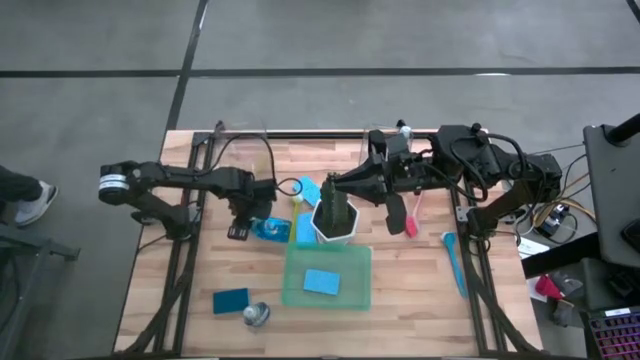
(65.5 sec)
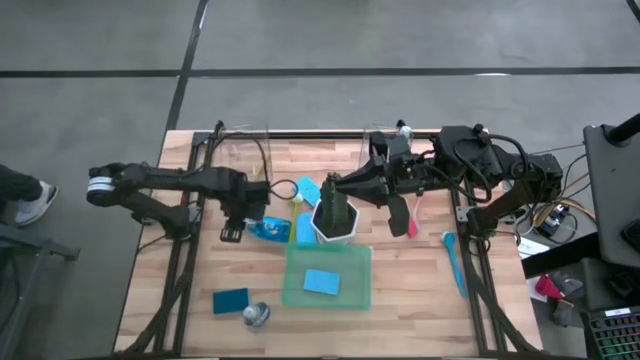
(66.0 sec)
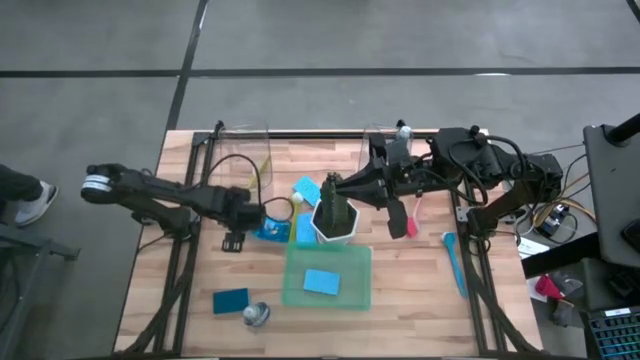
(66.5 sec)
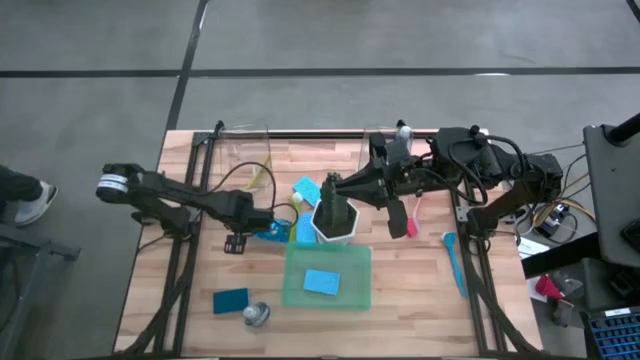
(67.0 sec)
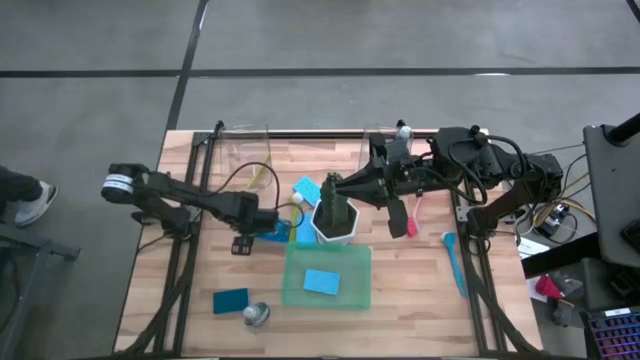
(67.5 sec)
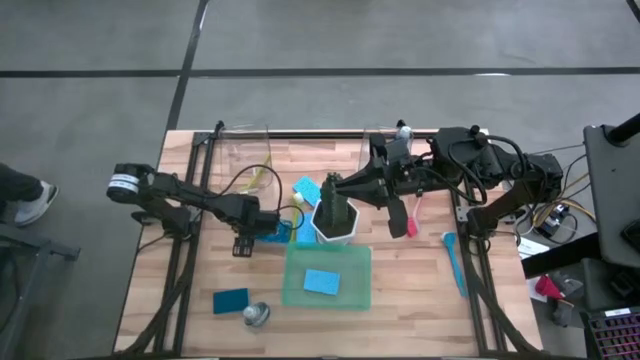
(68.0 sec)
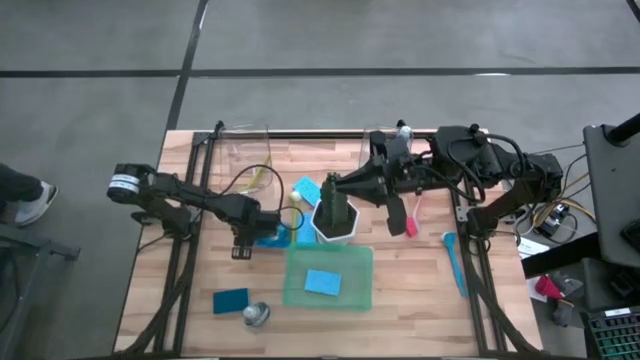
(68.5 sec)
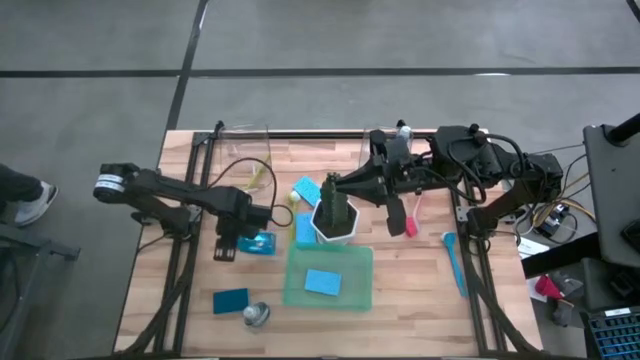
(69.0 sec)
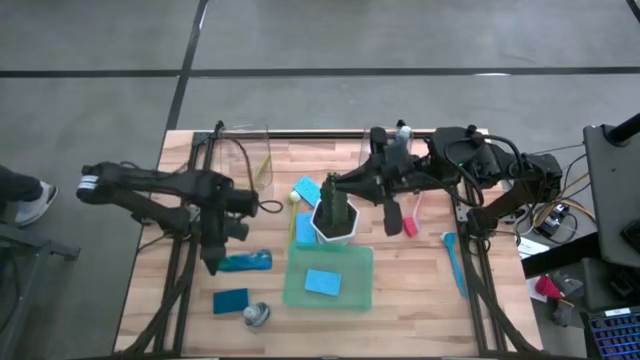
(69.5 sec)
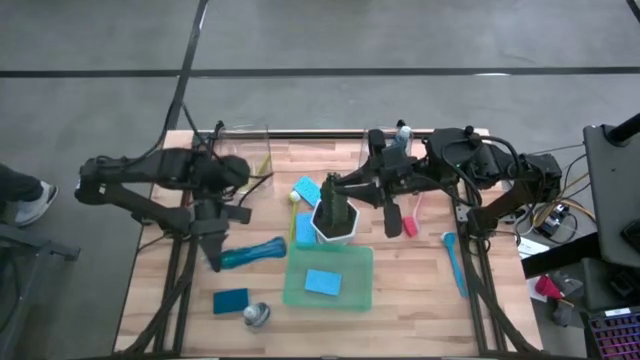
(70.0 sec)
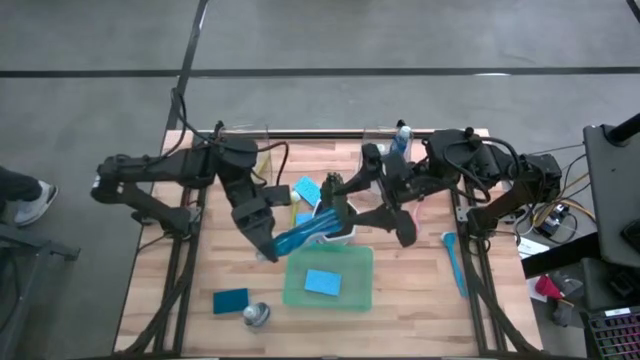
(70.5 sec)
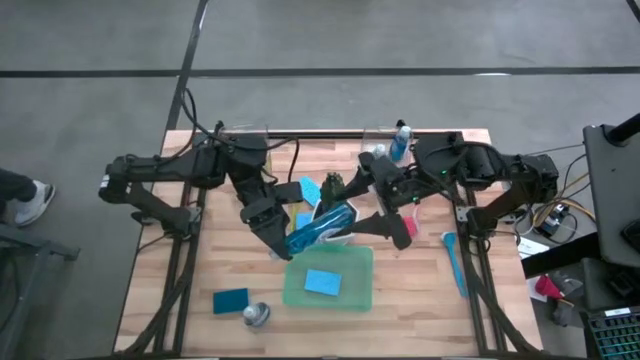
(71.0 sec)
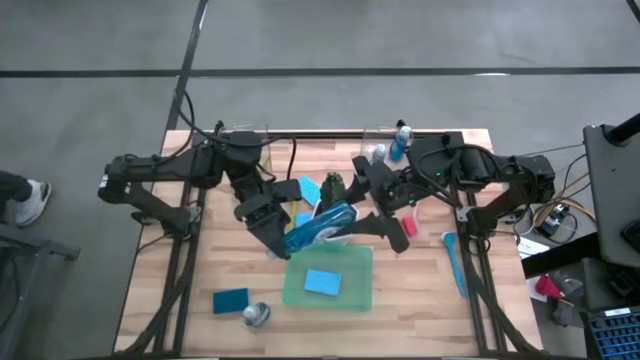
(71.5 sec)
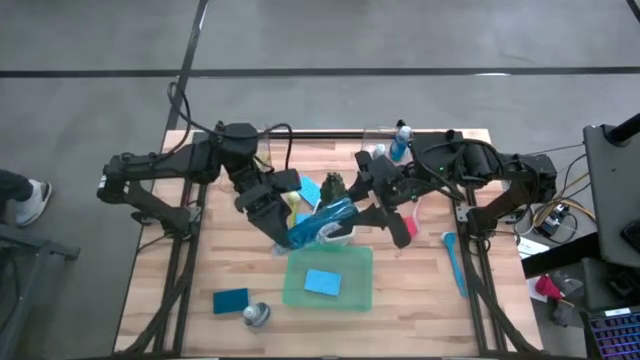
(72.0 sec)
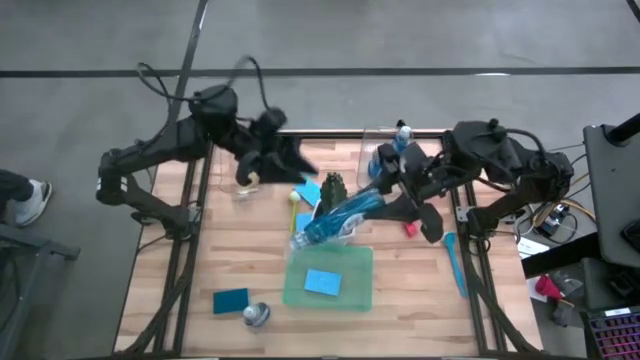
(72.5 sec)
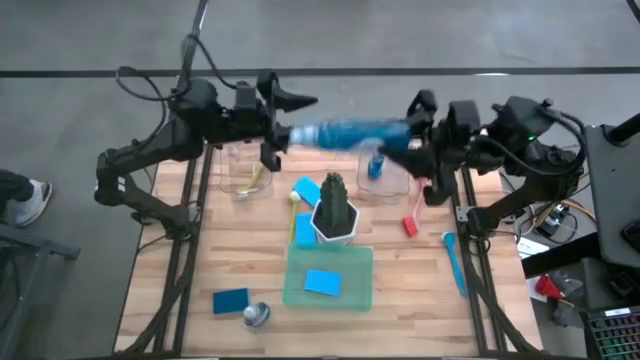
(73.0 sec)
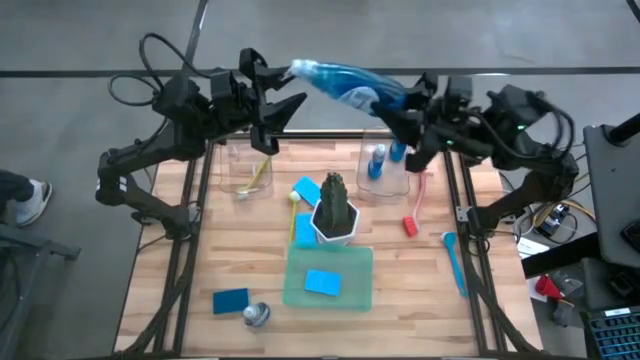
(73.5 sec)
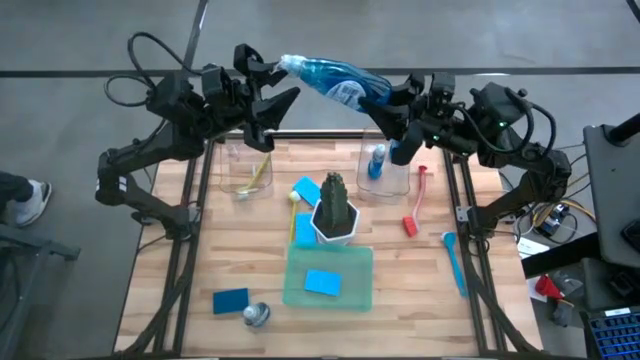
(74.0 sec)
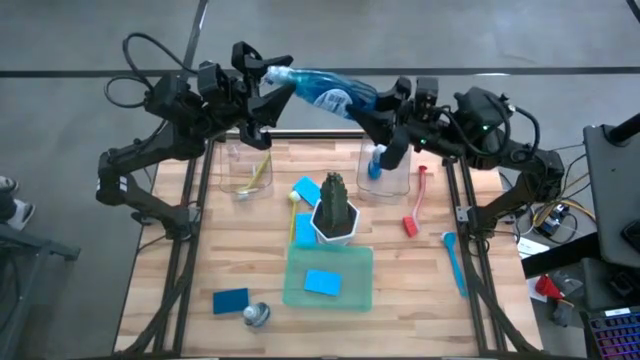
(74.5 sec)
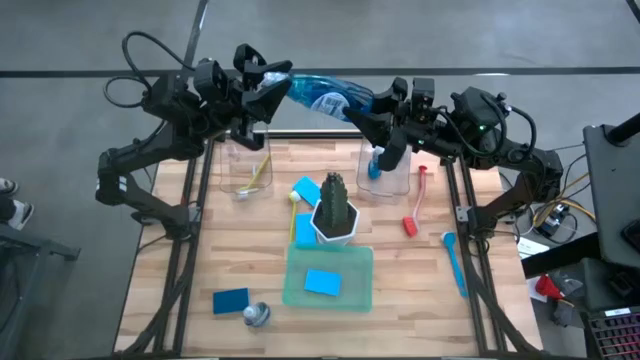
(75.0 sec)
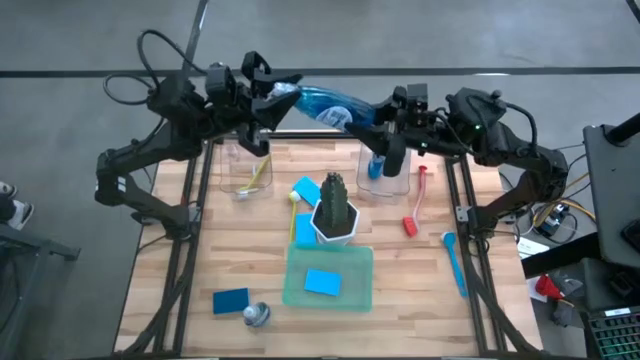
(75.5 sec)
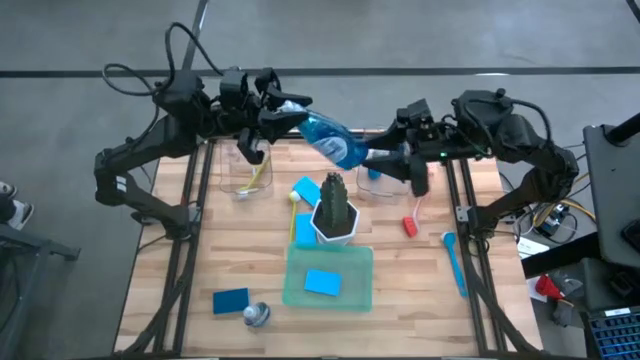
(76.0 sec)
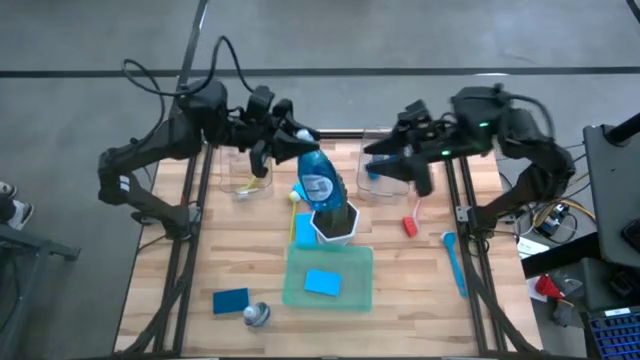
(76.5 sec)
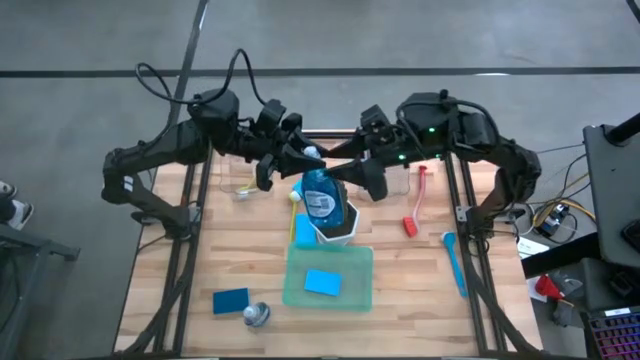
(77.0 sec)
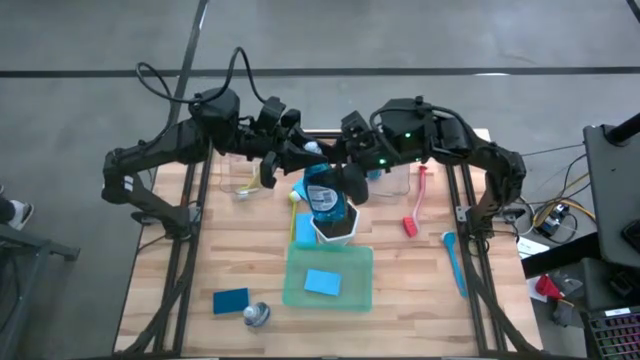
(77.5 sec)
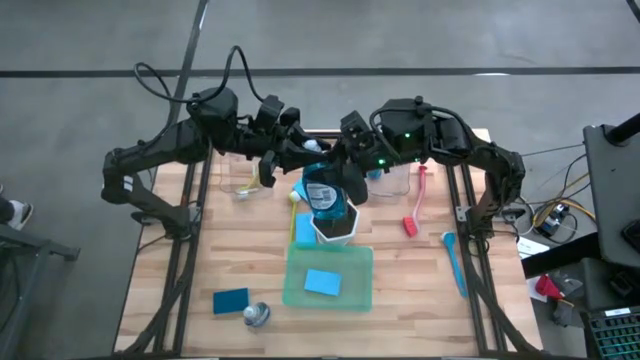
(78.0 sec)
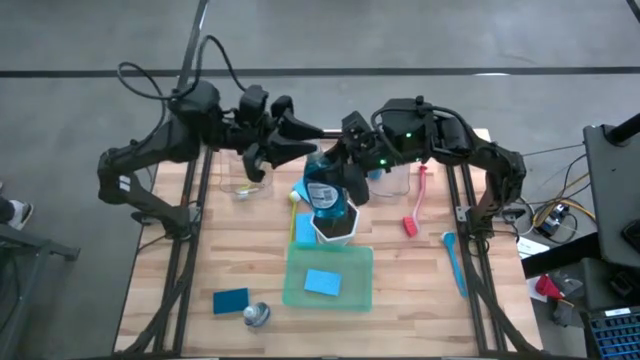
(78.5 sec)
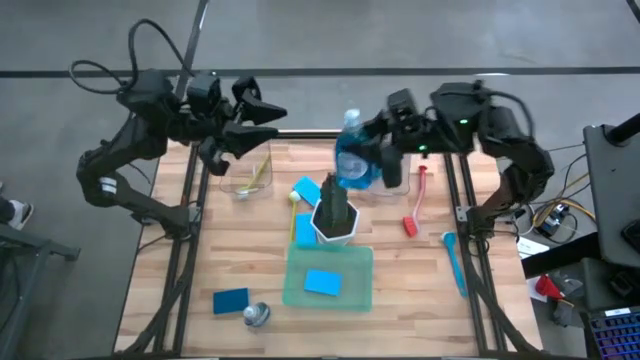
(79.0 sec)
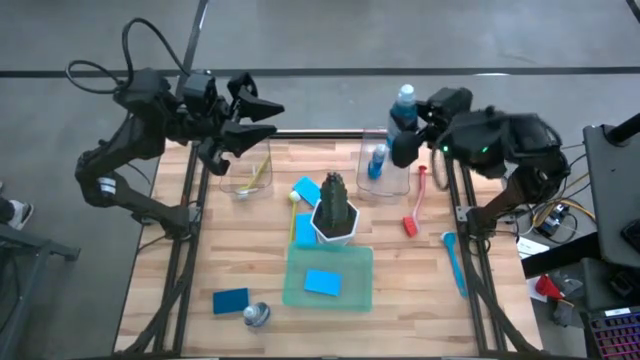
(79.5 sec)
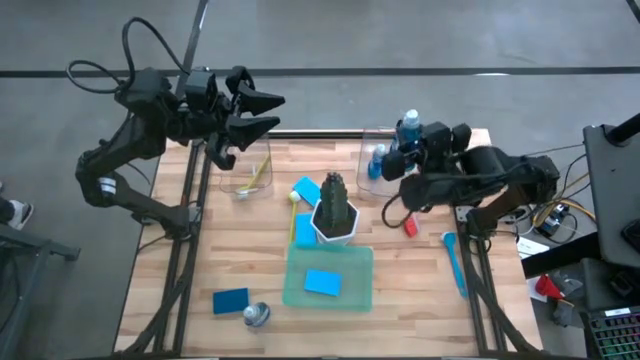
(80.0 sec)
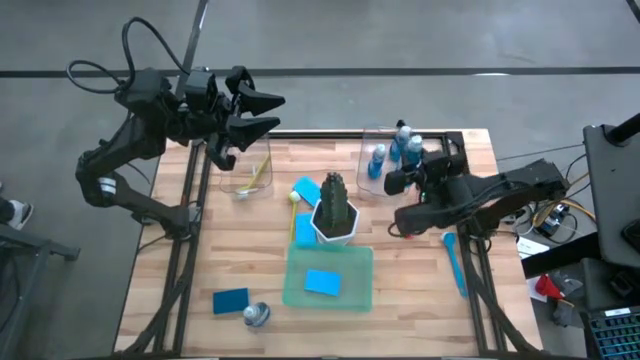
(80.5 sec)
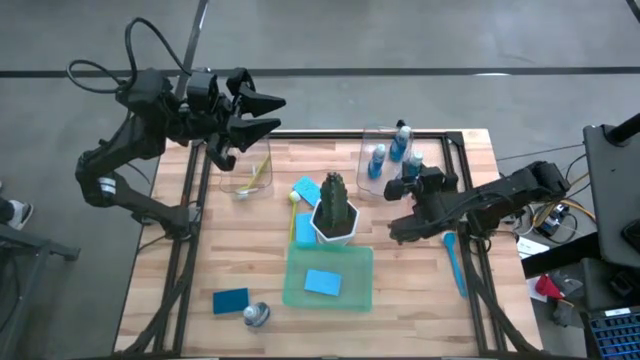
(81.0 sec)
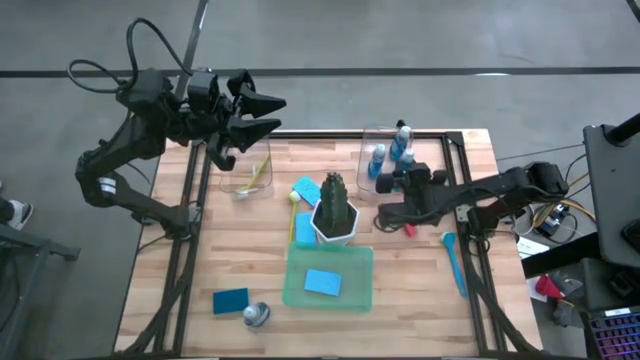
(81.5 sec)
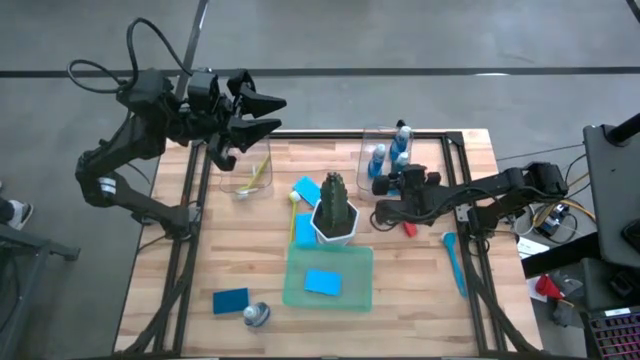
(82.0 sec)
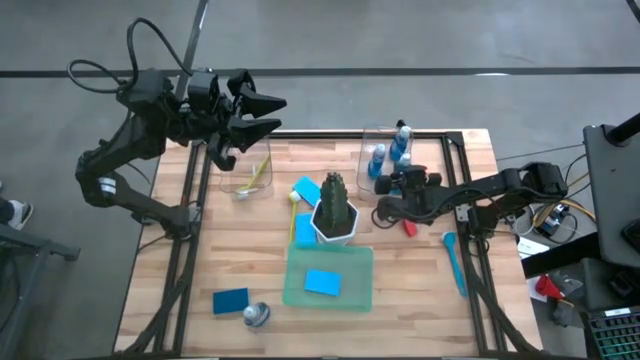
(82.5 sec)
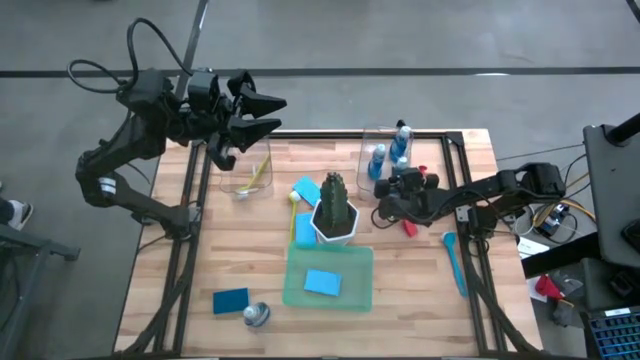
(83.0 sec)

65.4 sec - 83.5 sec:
Task: Pick & Place Kitchen Sink Supplies
Put the dish soap into the right transparent bin

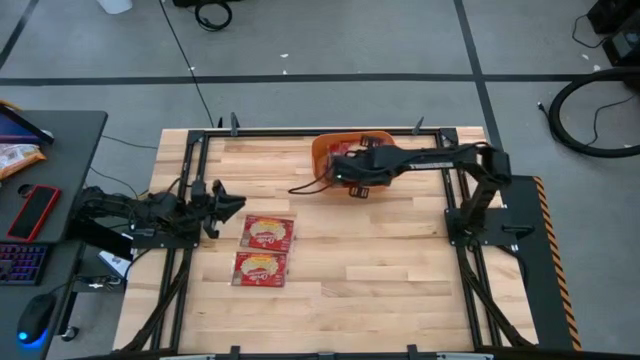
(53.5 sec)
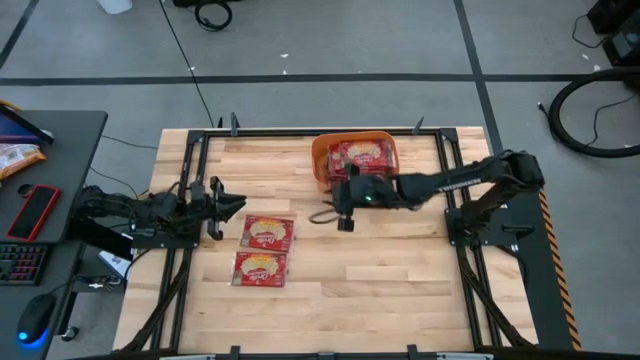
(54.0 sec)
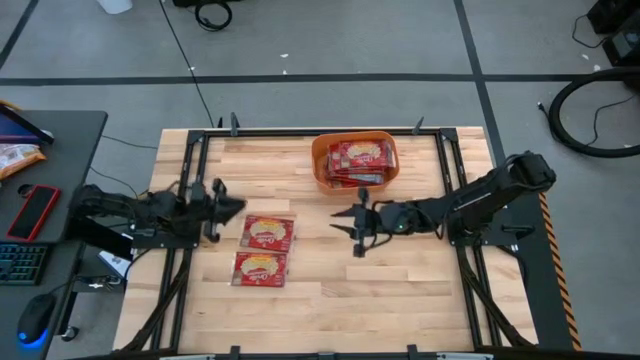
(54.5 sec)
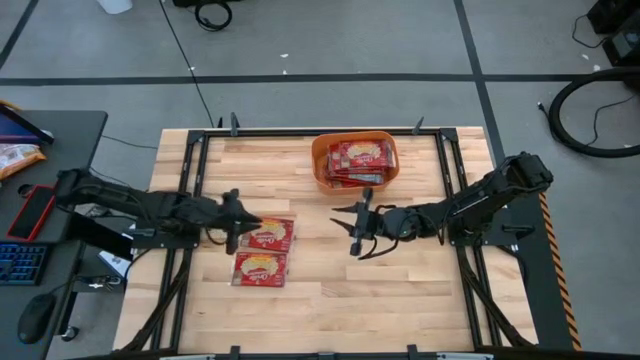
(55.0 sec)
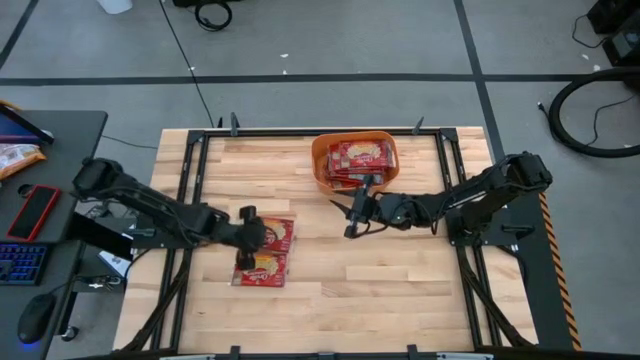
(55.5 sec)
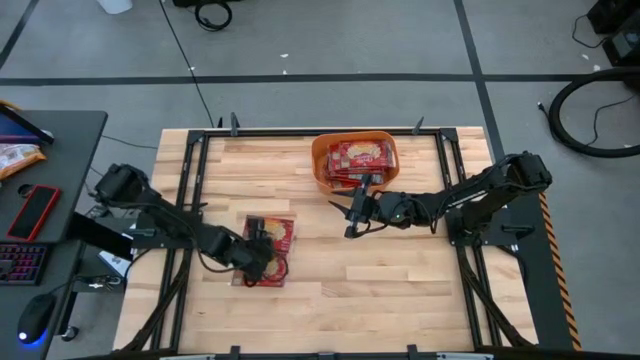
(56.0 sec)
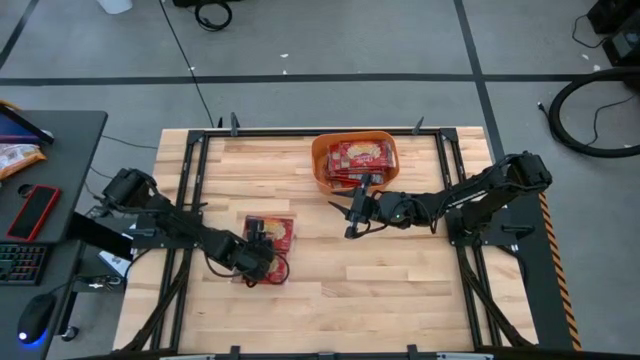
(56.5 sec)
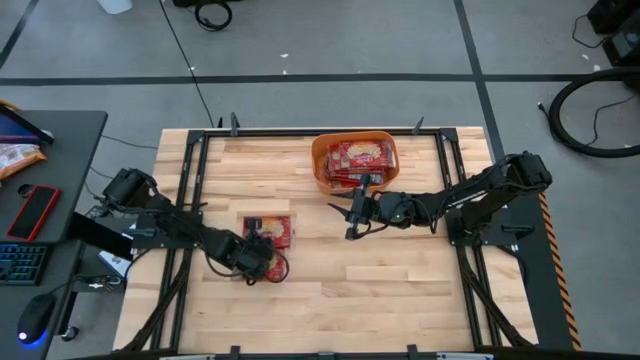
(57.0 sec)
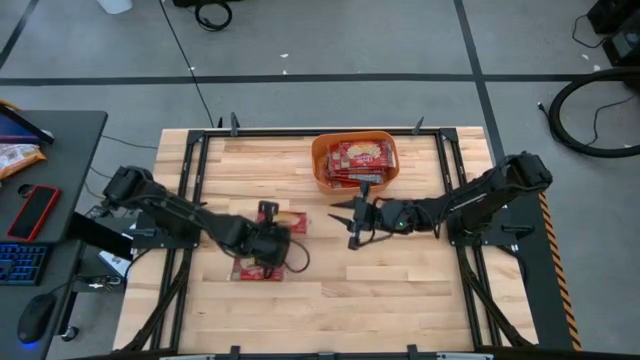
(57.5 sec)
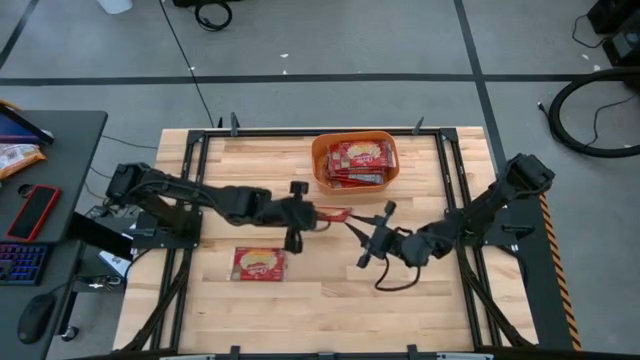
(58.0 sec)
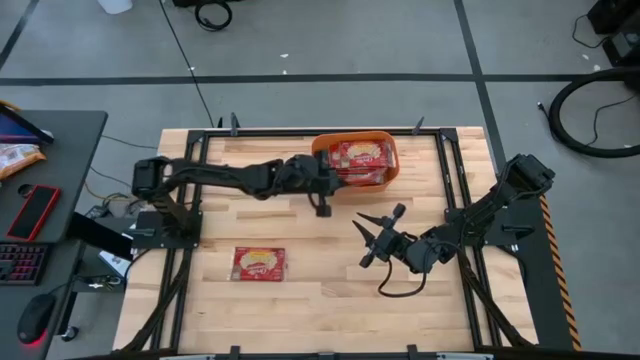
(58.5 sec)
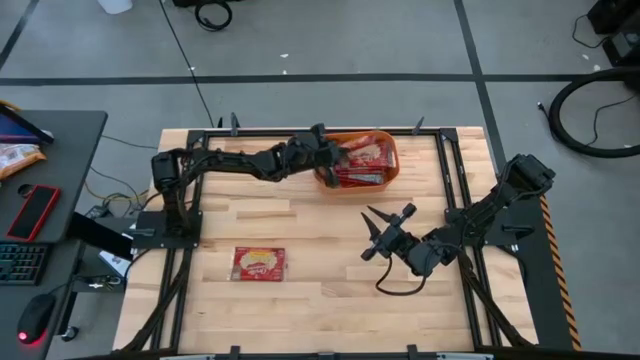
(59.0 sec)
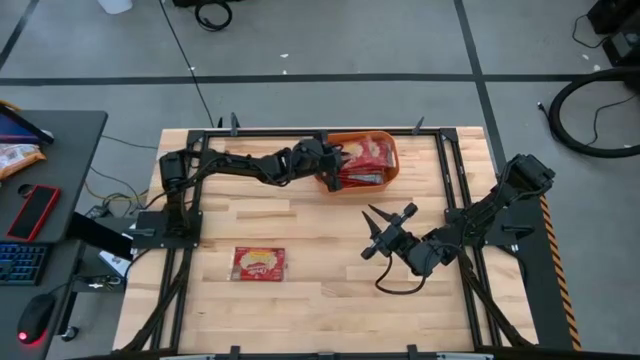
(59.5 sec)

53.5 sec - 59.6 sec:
Task: Sort popcorn bags into baskets
Stack the popcorn bag on top of the other popcorn bag into the orange container
